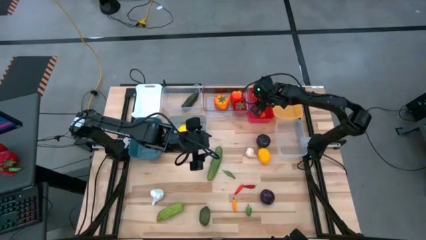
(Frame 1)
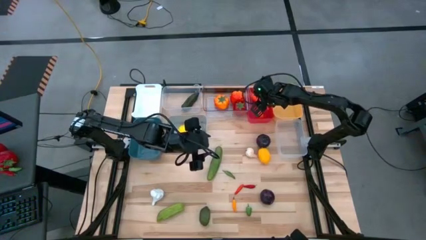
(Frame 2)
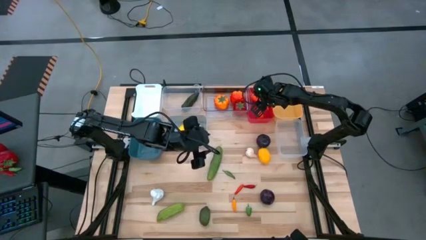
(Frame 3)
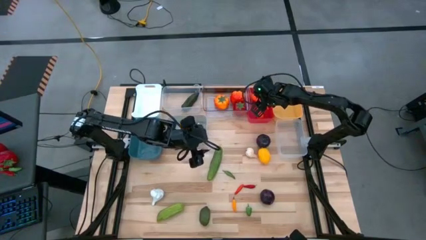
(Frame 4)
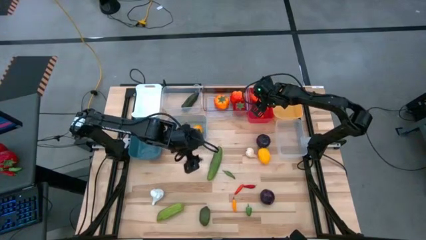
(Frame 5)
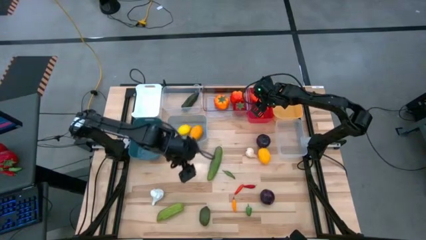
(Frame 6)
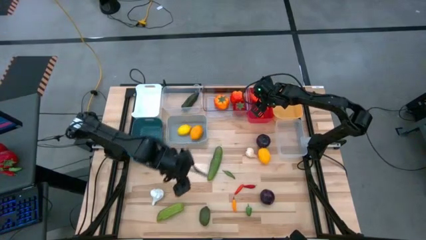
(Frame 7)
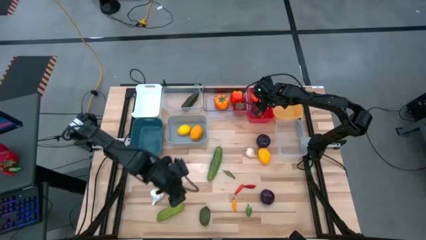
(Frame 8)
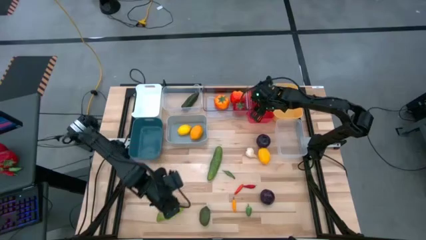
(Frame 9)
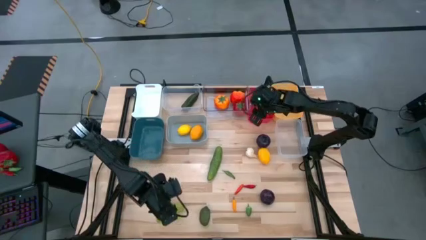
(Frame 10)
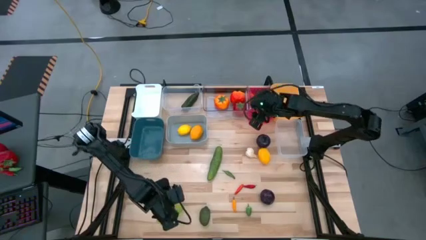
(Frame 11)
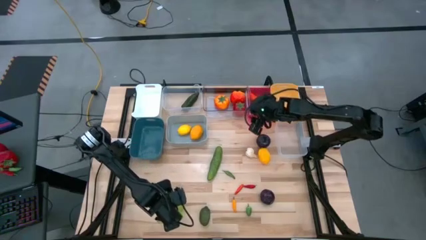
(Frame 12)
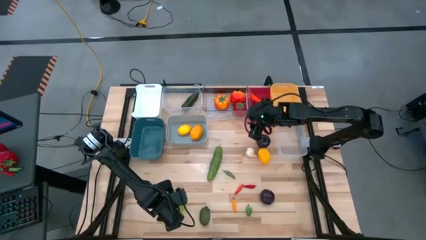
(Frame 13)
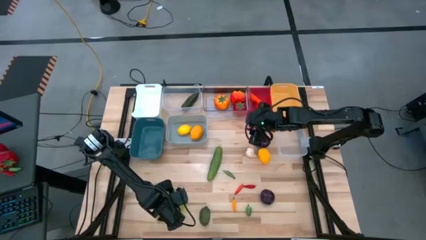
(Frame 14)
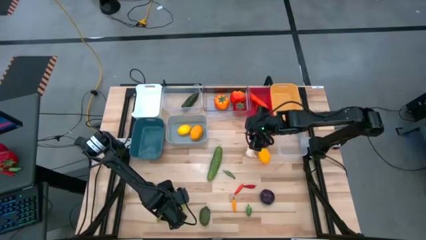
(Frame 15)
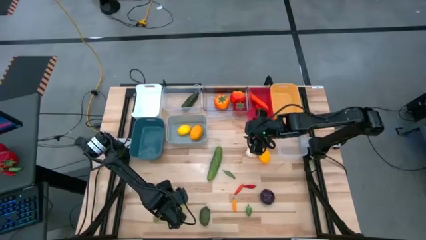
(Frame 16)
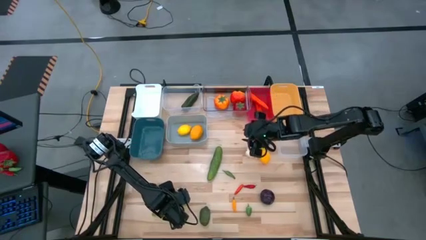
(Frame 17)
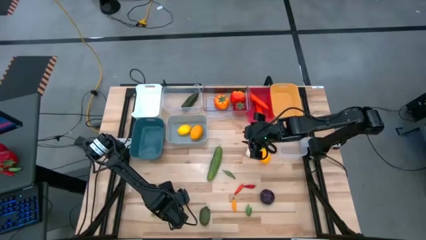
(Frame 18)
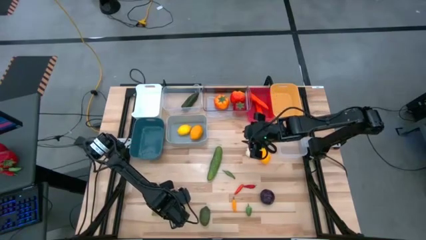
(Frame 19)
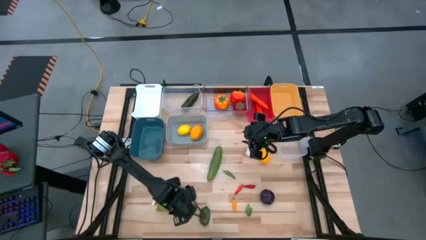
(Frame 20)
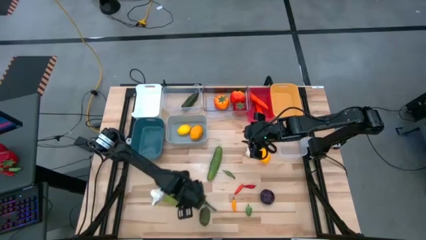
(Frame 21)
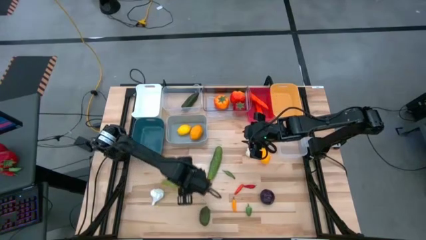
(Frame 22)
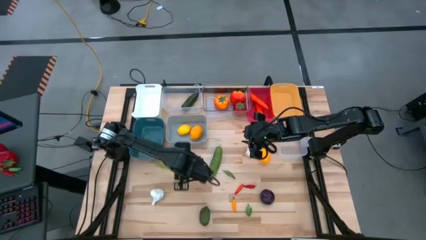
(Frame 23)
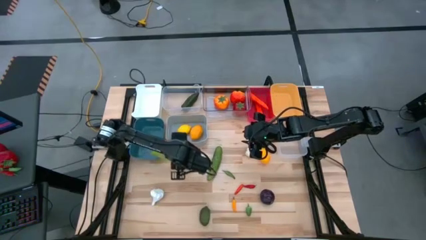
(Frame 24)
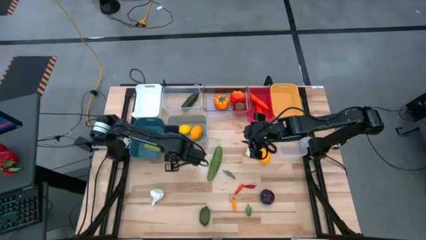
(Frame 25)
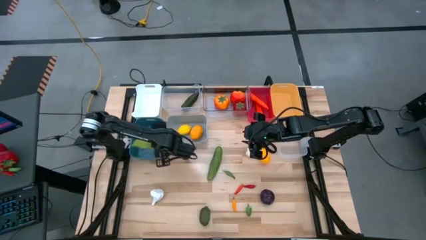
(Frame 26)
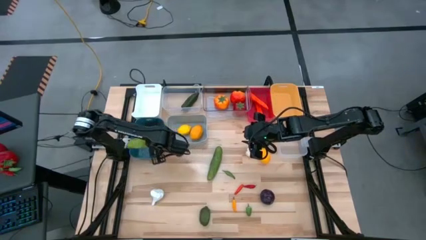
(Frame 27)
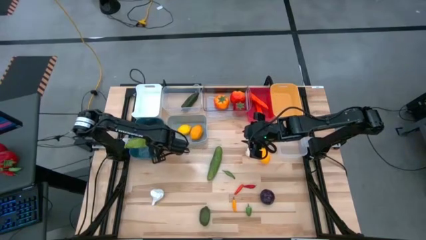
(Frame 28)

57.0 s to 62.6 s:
Task: Sort produce into baskets
Put the bottom cucumber into the green bin

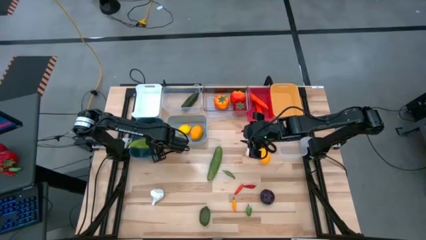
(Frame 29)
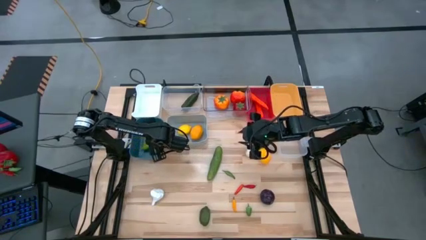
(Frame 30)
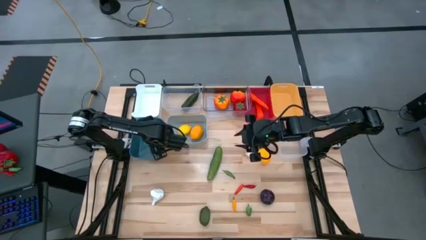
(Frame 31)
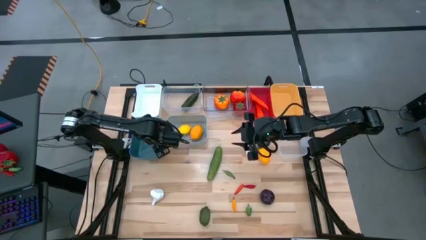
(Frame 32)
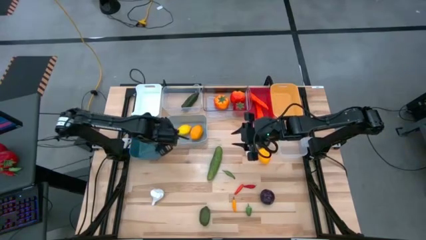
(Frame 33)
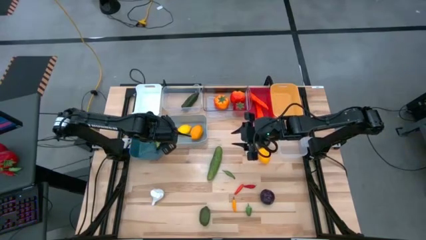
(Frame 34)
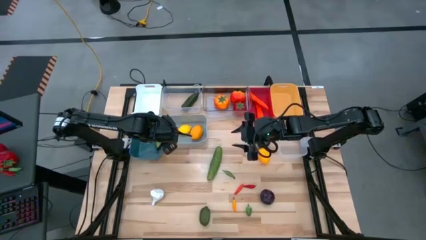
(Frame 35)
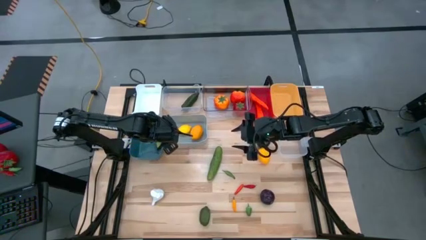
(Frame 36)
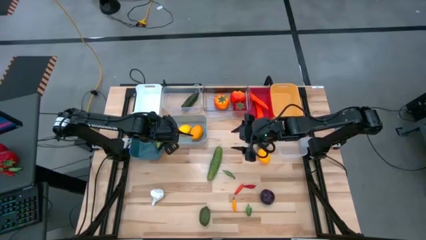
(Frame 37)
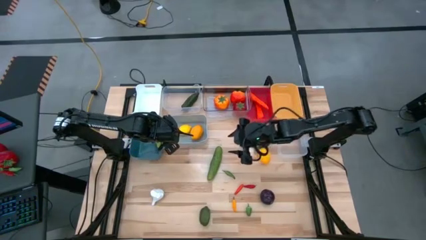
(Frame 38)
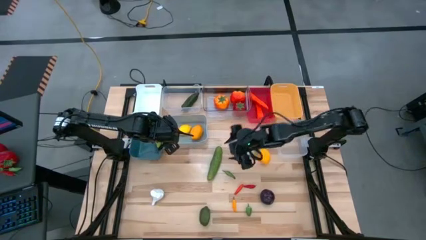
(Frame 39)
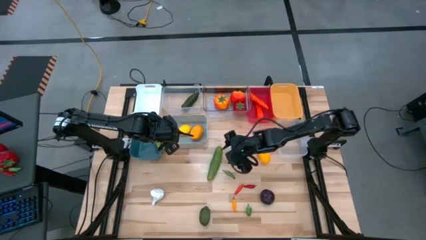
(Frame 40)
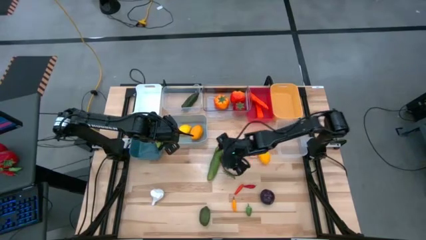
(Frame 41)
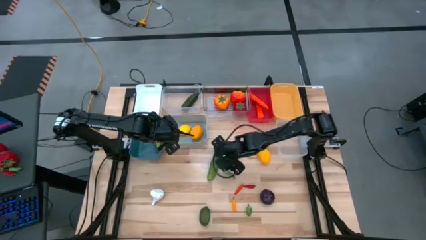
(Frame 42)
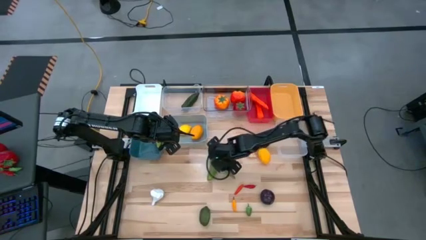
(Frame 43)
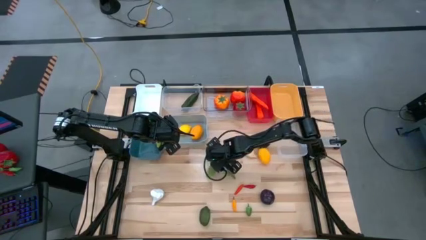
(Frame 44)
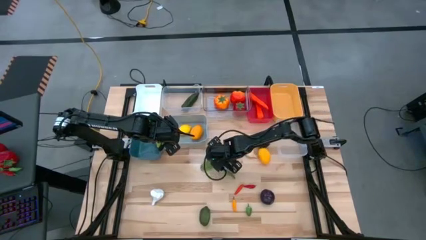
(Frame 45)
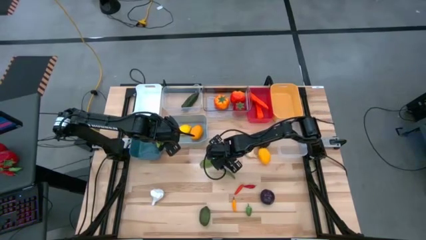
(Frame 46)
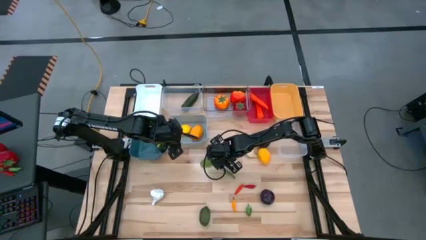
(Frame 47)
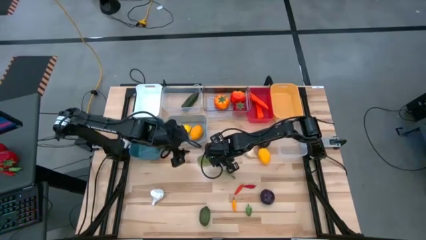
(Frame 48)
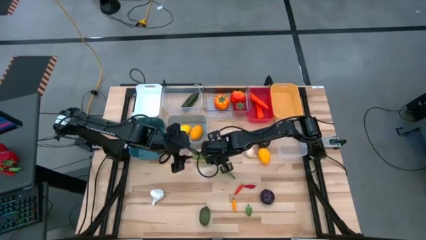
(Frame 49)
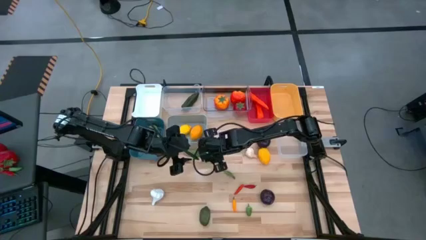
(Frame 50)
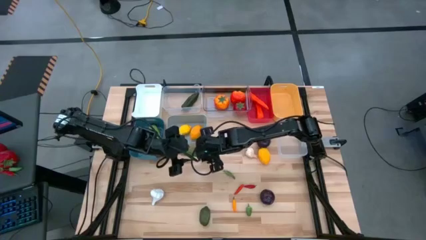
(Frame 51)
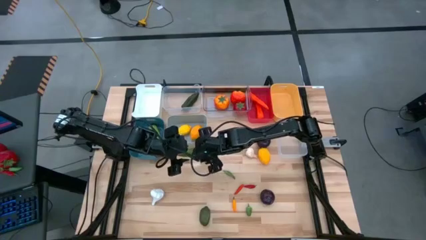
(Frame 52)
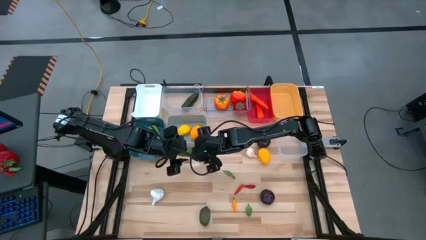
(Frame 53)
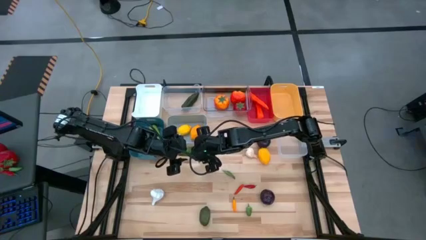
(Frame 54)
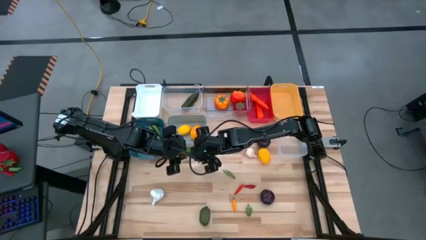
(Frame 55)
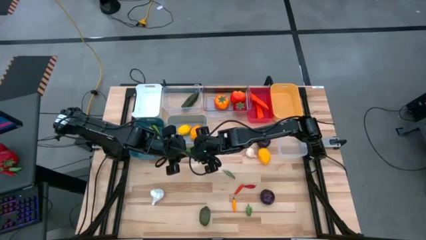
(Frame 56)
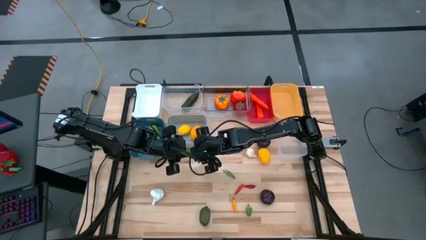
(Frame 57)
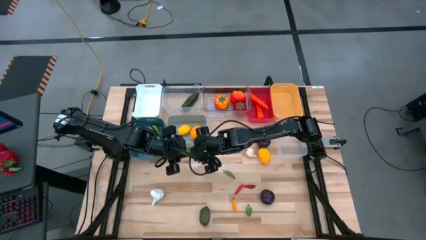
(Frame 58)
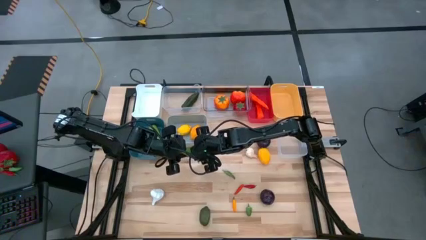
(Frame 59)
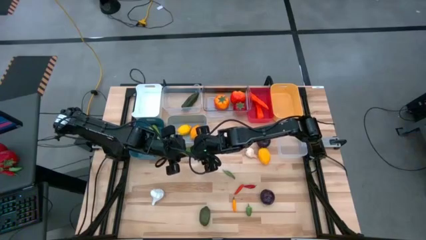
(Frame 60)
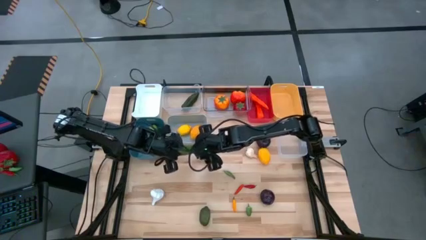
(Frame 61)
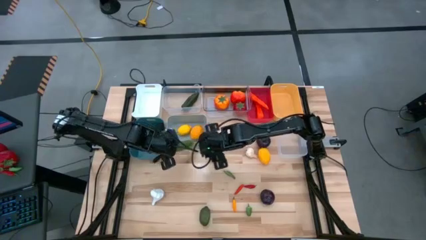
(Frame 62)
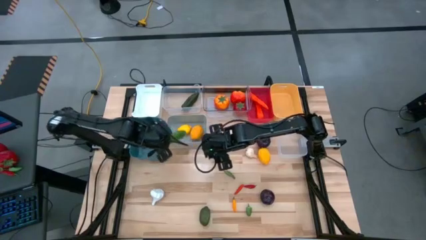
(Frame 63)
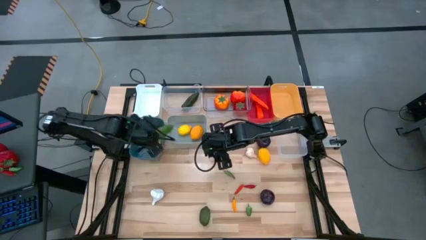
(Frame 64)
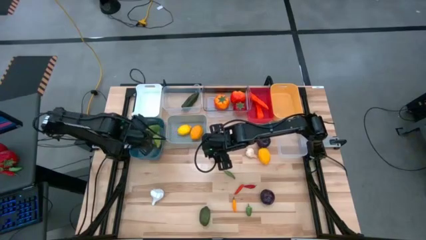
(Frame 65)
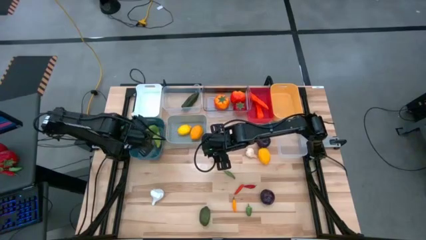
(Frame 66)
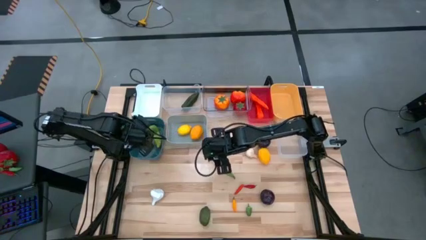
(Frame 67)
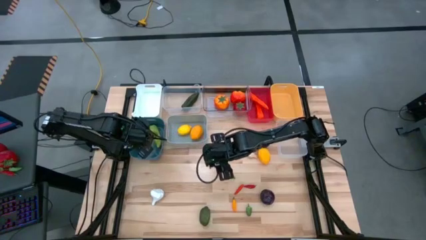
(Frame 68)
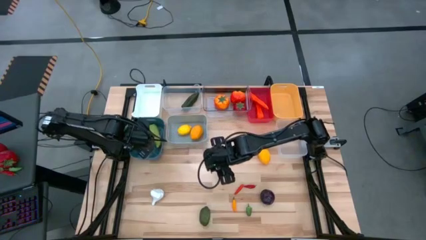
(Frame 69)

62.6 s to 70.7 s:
Put the cucumber into the green bin

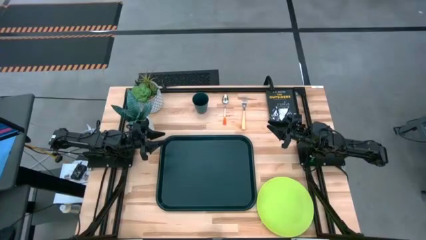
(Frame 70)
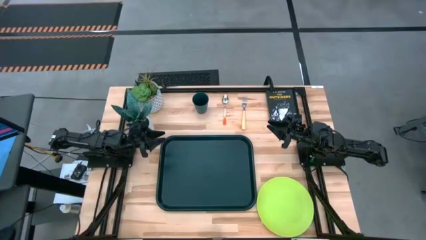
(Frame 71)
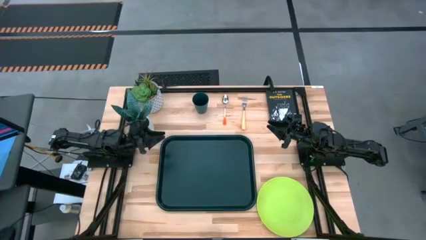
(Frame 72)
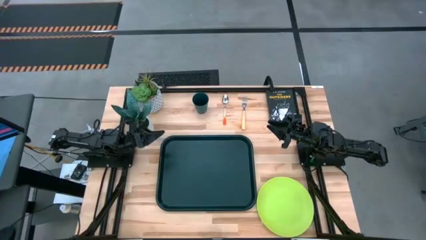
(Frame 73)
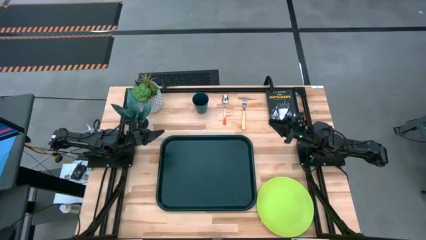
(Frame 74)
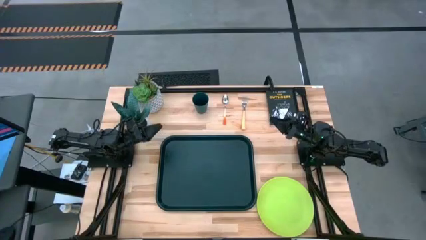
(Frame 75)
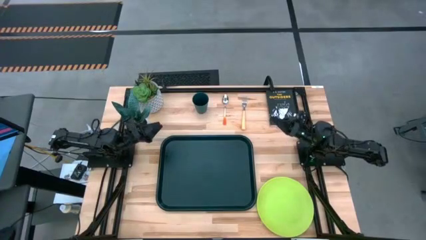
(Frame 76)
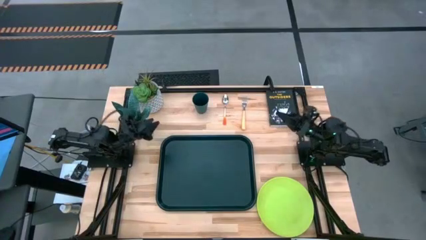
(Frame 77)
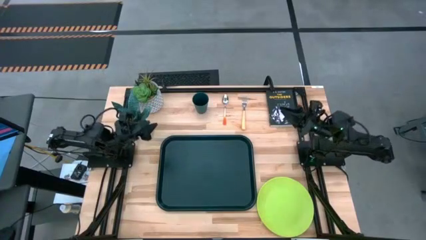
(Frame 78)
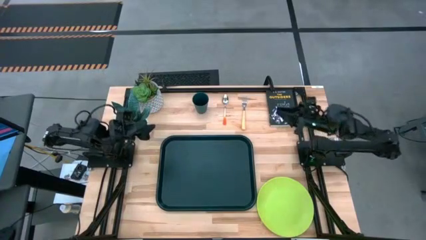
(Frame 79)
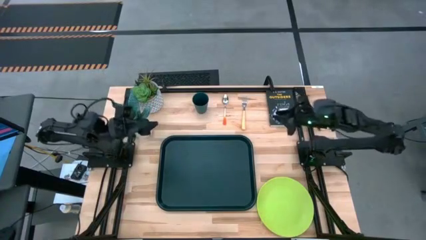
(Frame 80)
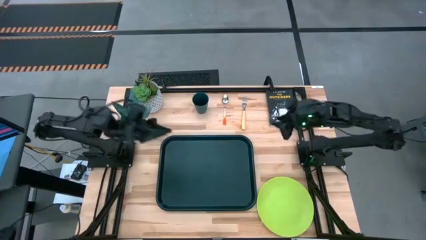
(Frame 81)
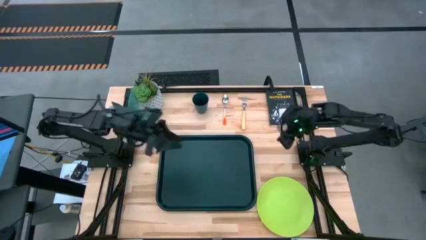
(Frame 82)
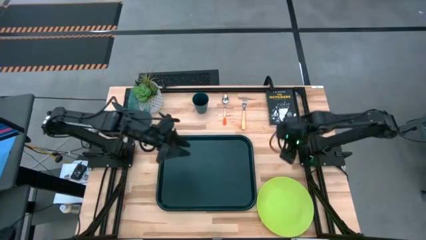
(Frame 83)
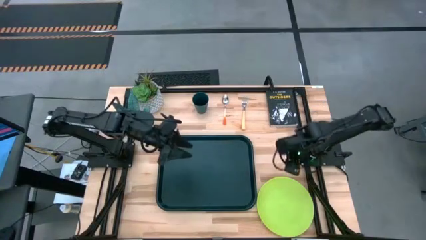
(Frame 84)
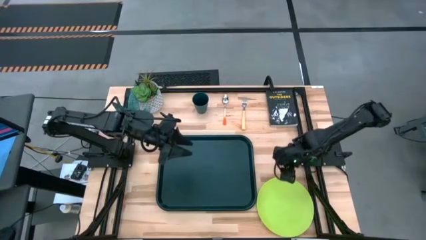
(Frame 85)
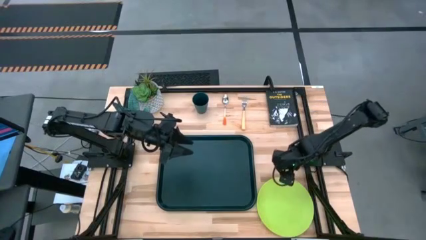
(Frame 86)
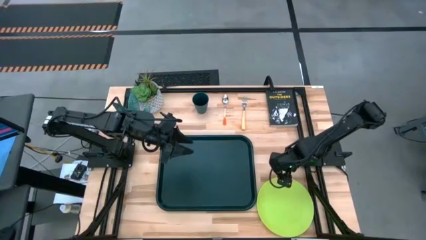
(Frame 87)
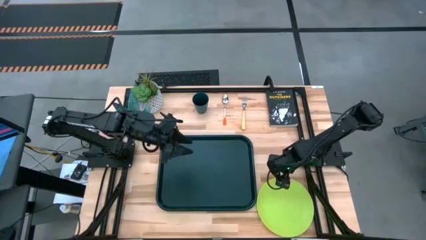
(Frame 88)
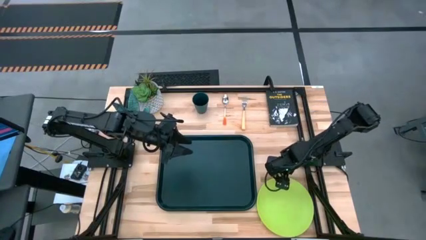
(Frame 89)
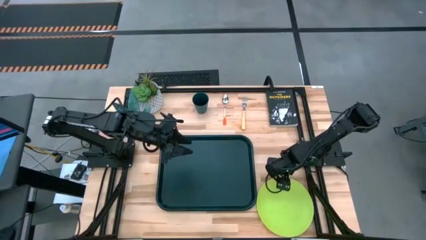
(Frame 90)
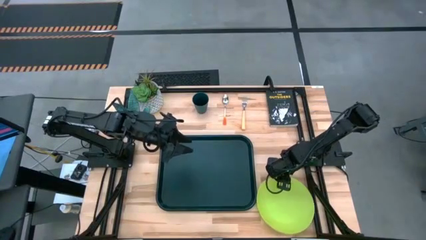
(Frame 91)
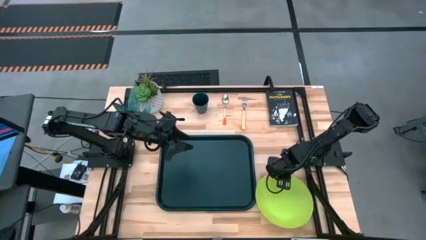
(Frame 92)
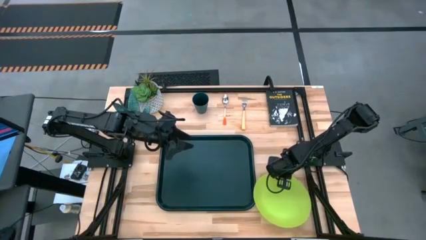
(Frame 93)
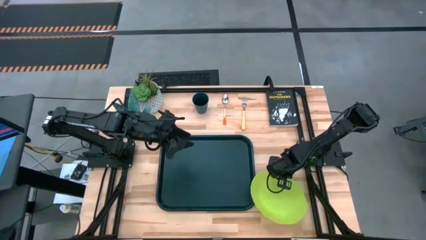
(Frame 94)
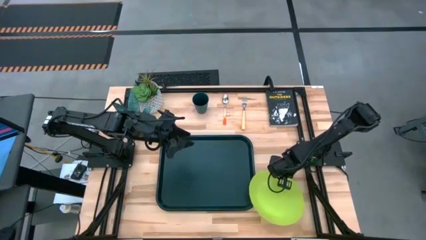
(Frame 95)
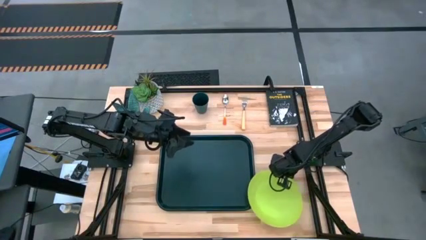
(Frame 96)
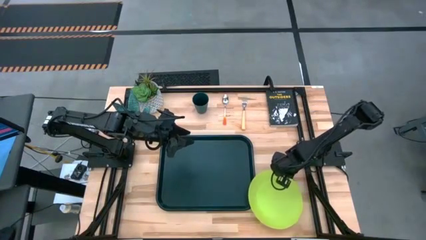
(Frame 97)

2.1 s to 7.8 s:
Task: Pick and place plate/cup/fork/spoon on tray
Put the green plate to the bottom right of the black tray
